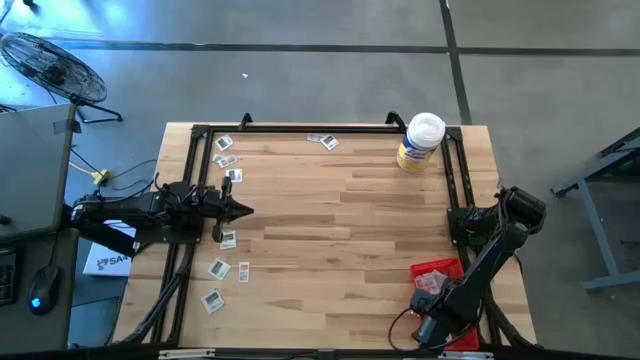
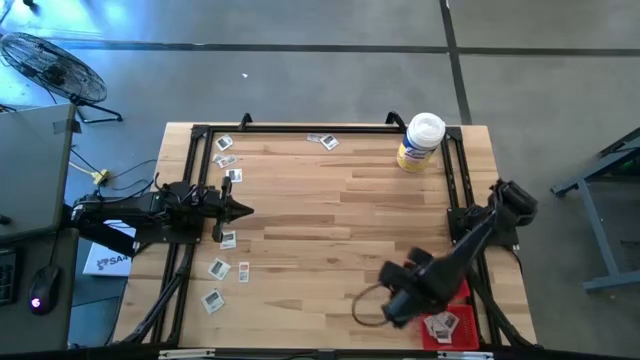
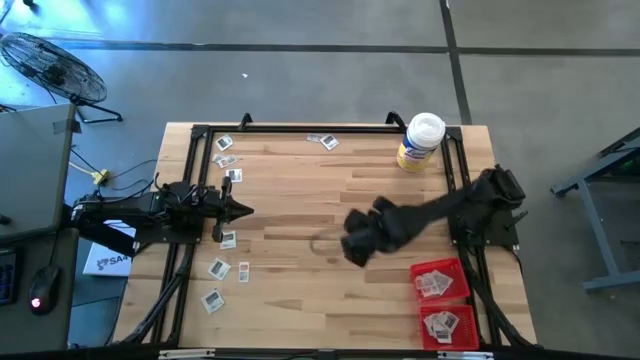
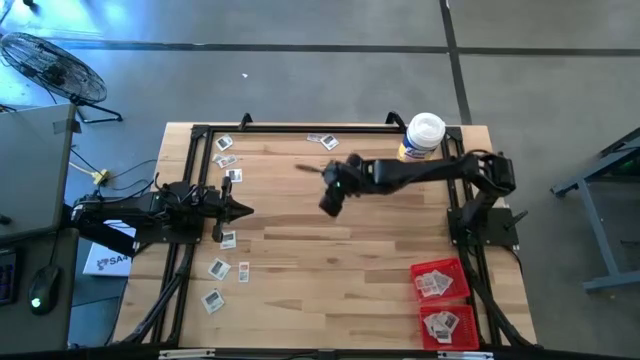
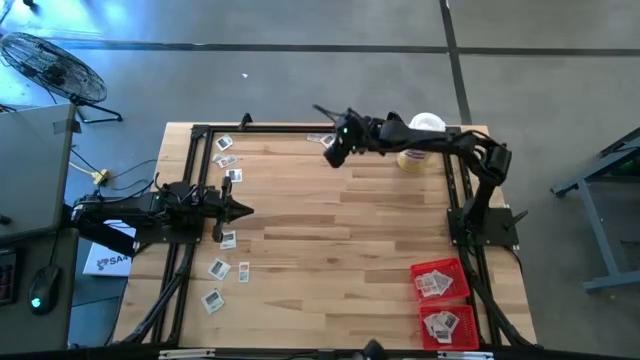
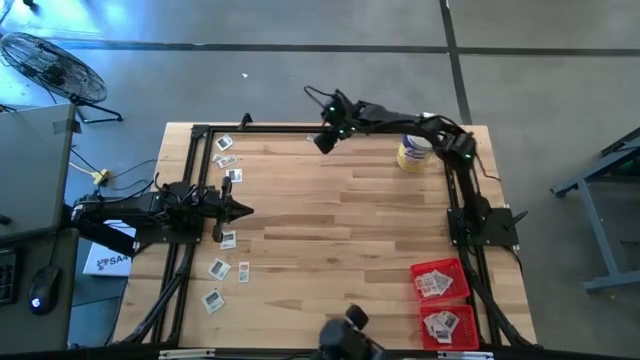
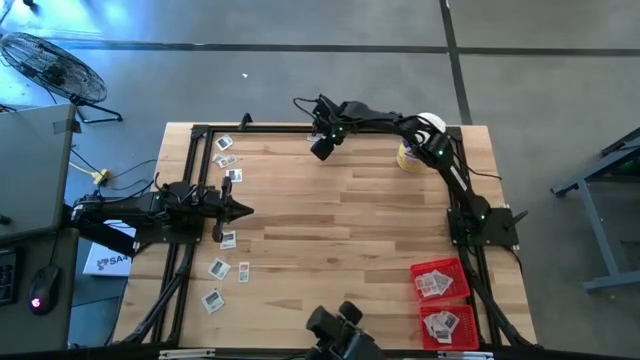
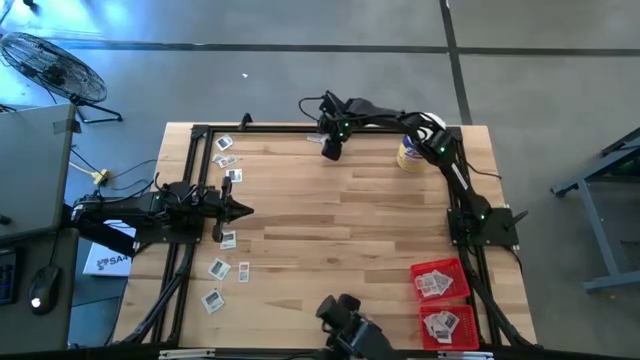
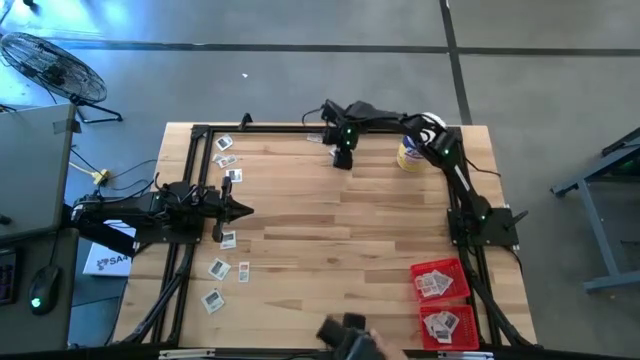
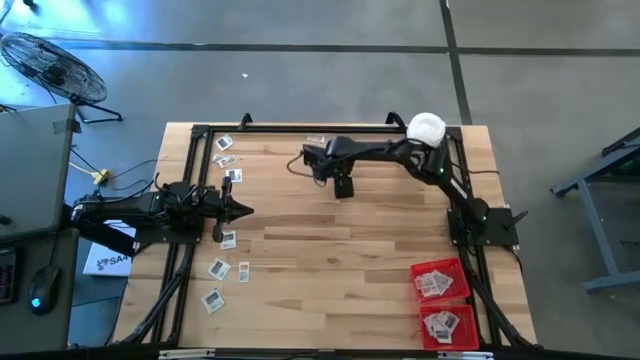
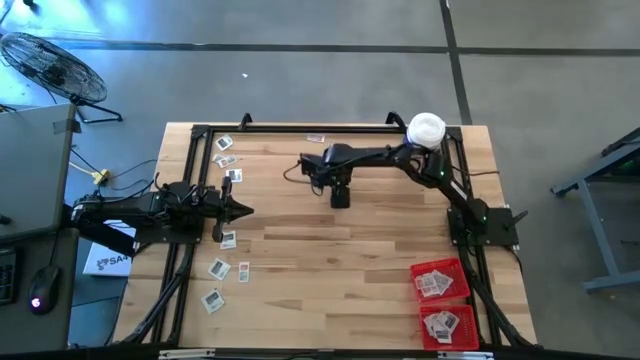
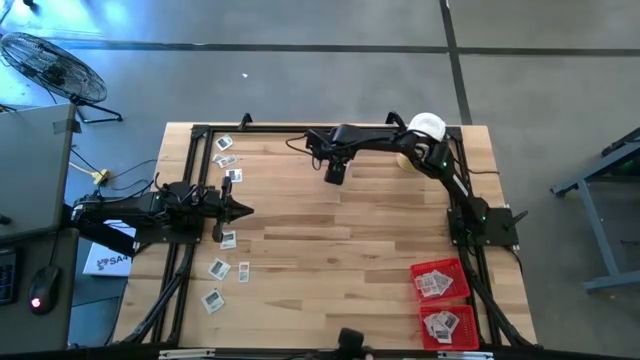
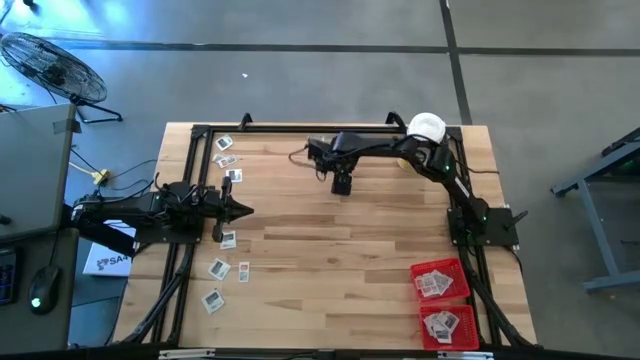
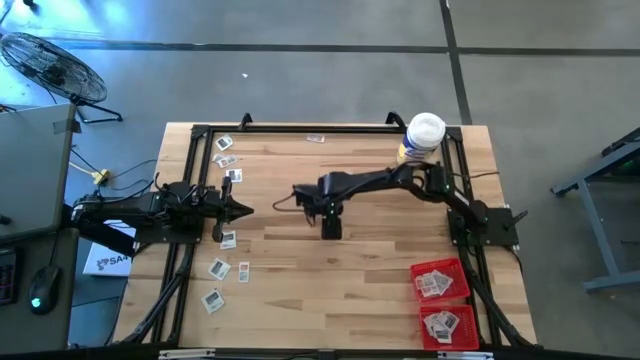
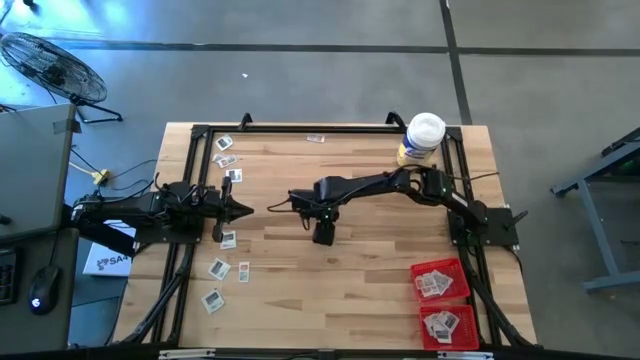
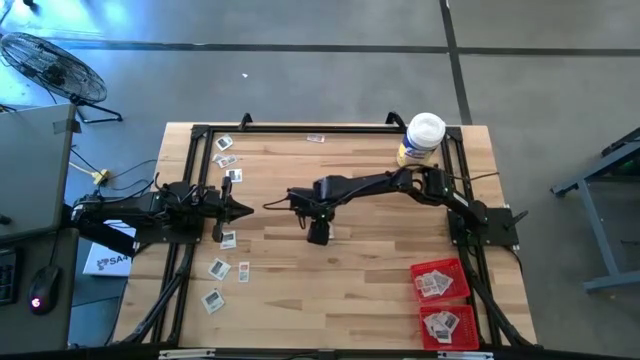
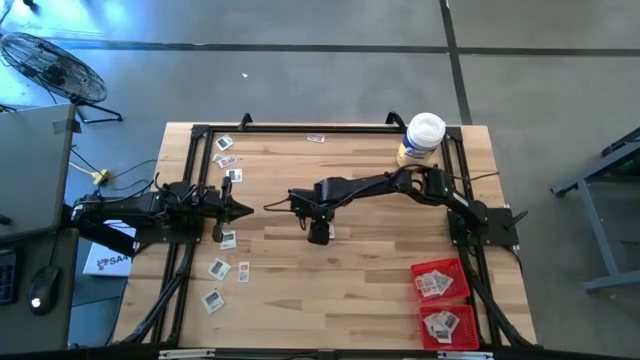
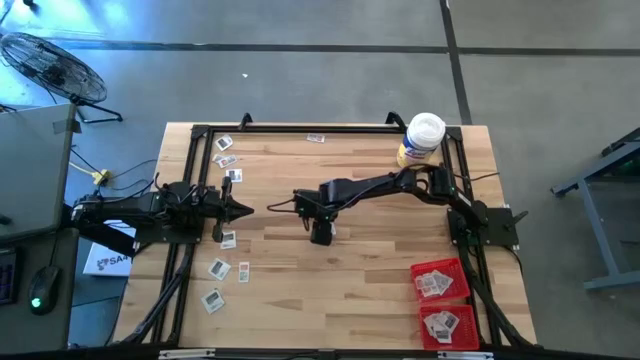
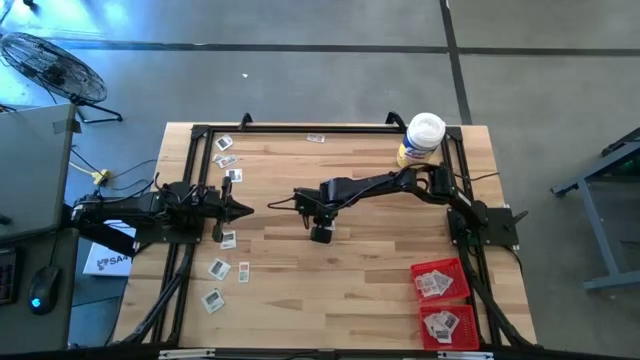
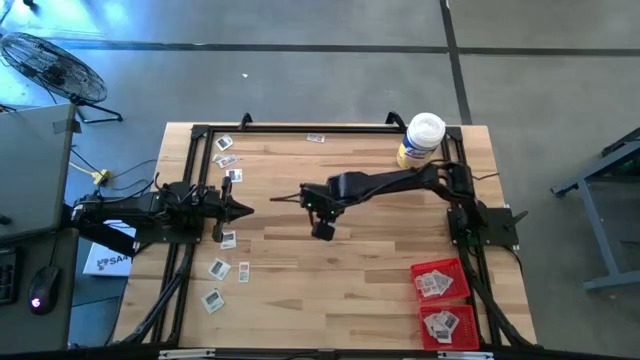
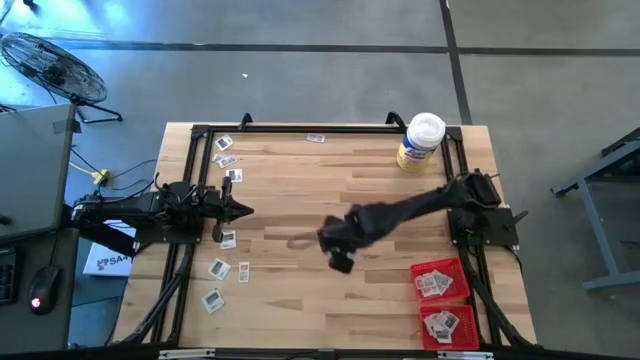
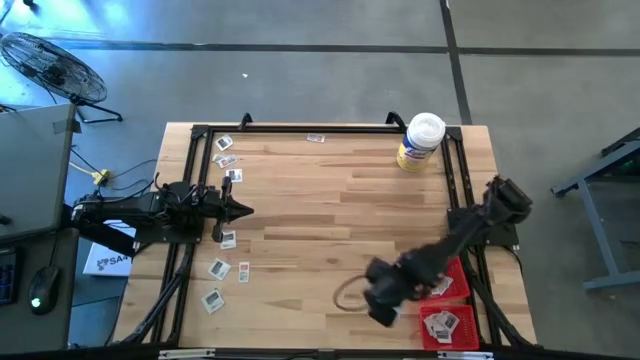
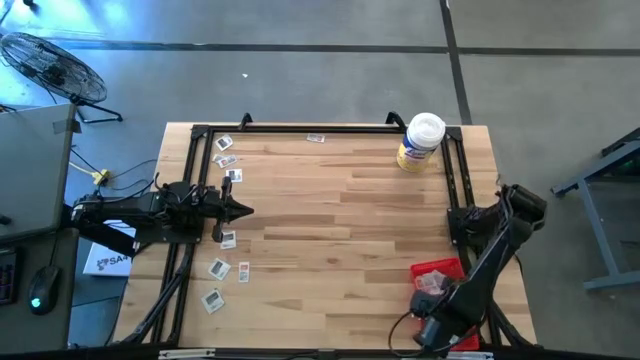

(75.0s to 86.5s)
Task: Pick & Place First Aid Supplies
Put the white towelette pack into the bottom red bin

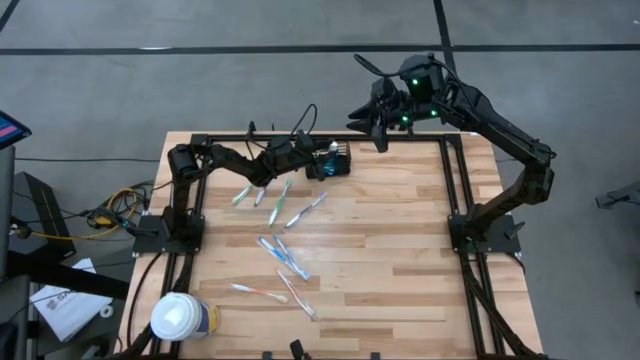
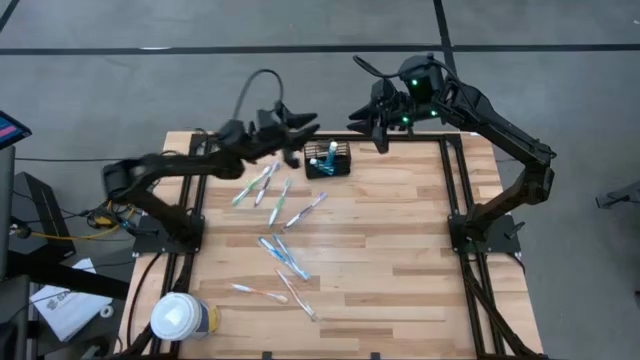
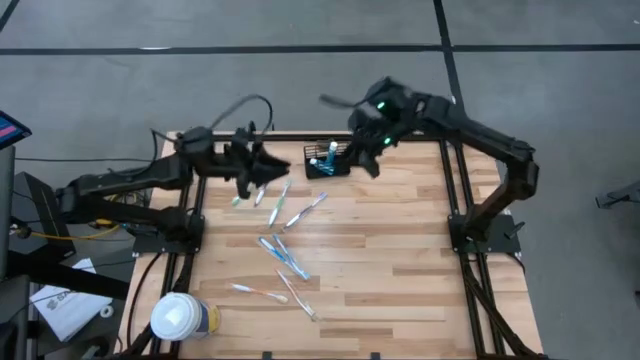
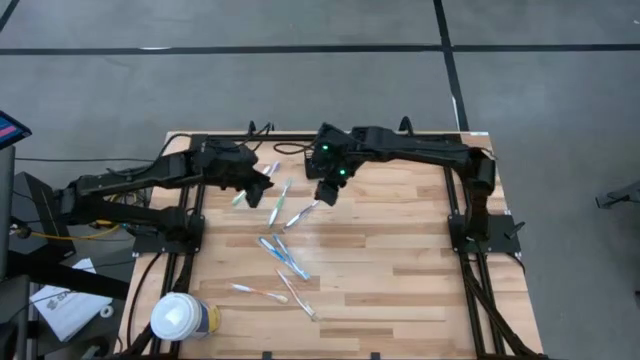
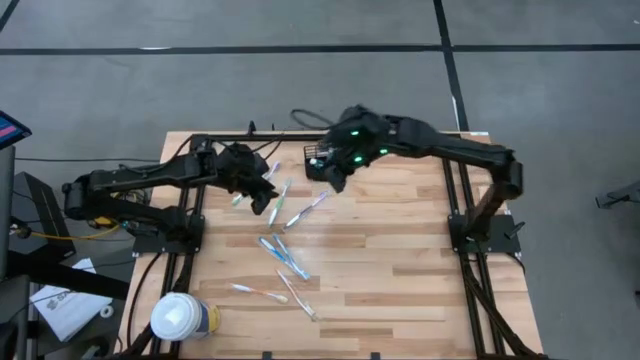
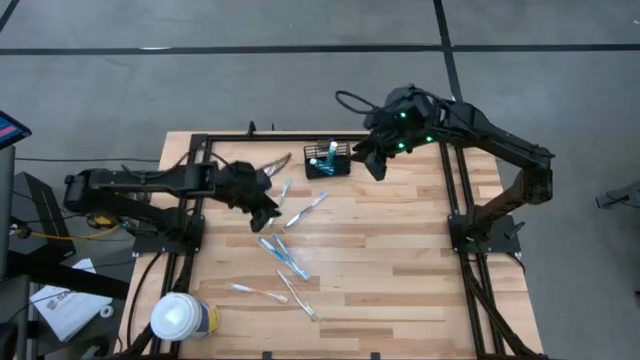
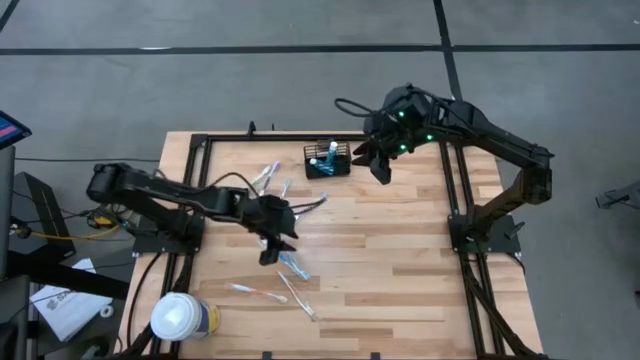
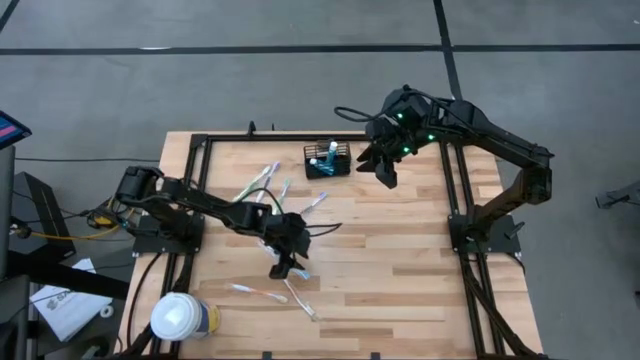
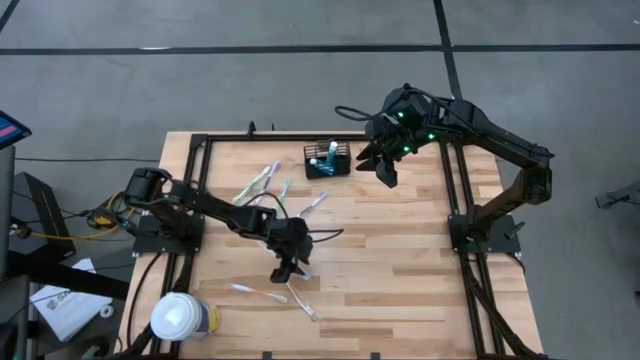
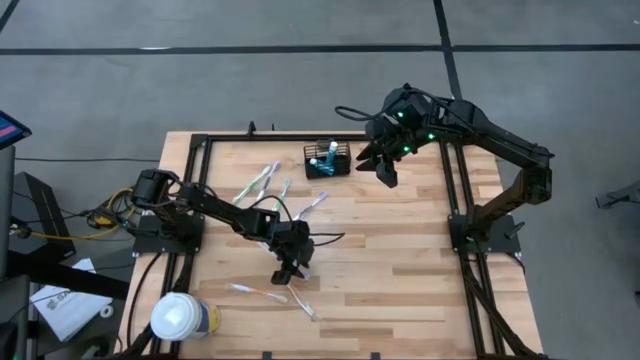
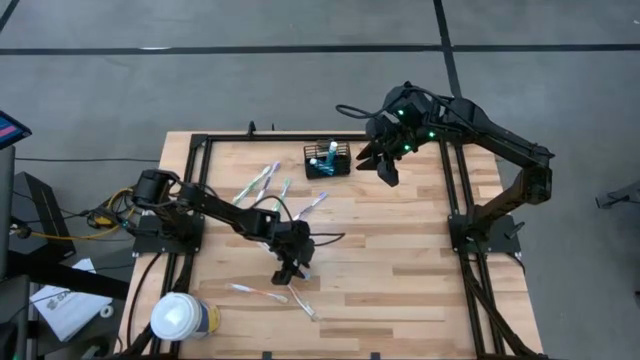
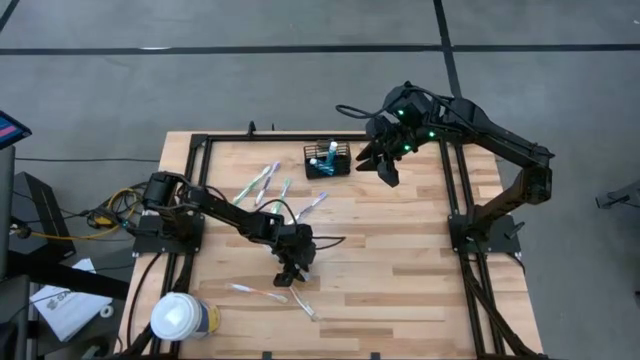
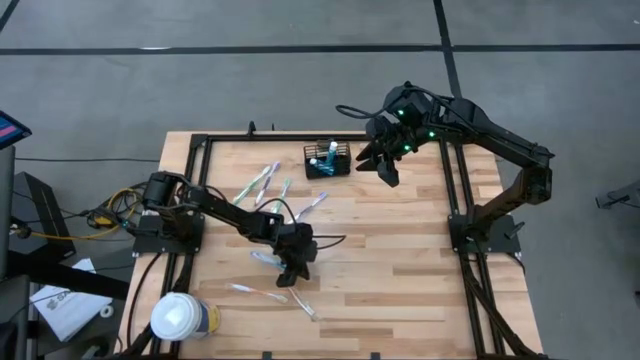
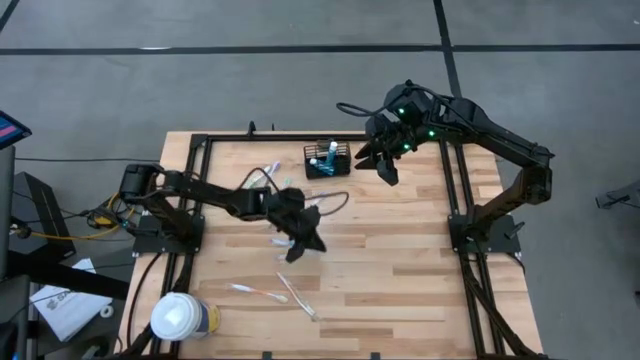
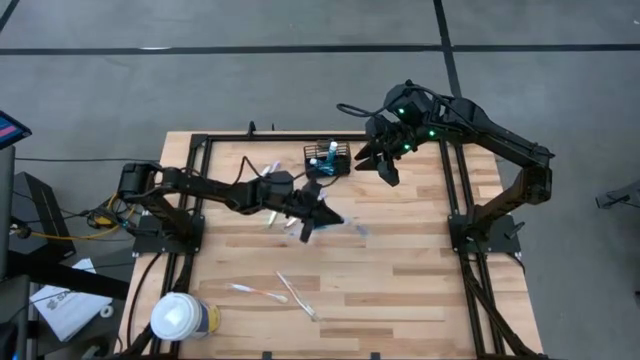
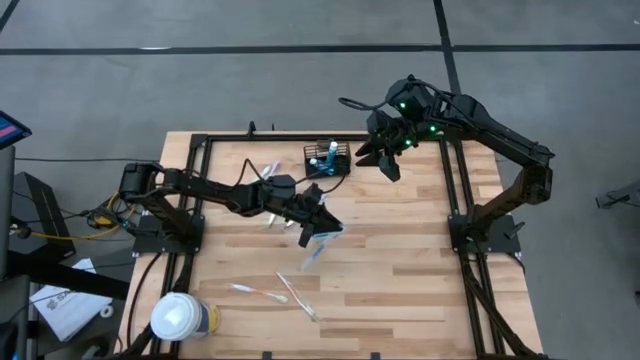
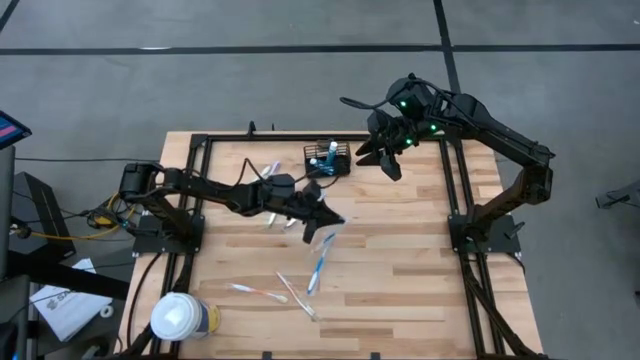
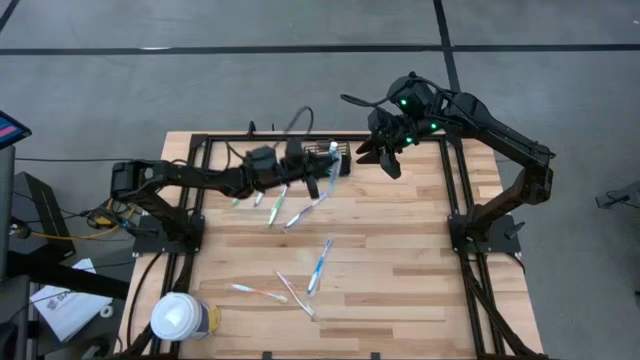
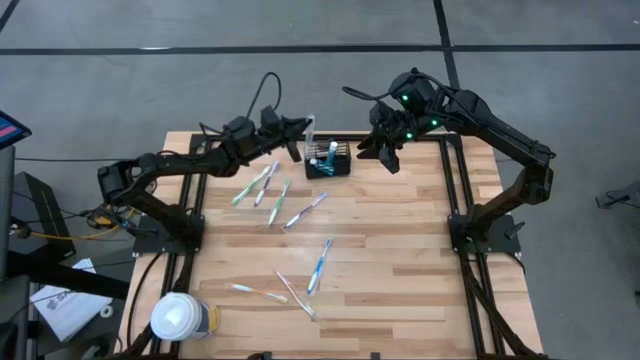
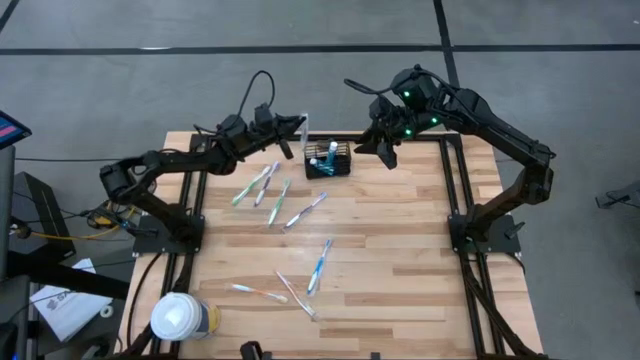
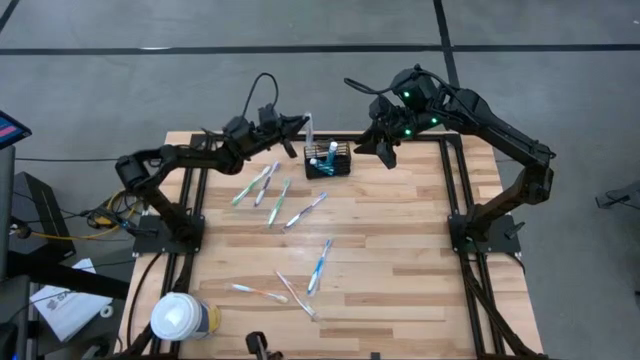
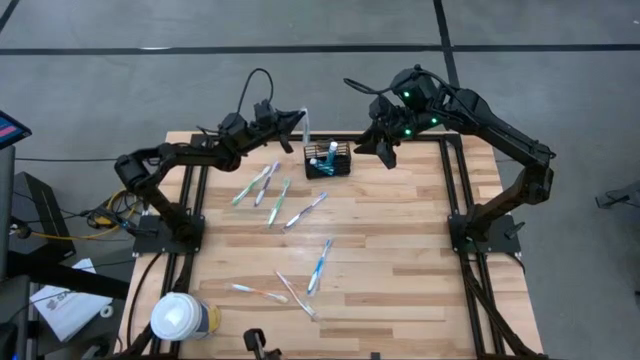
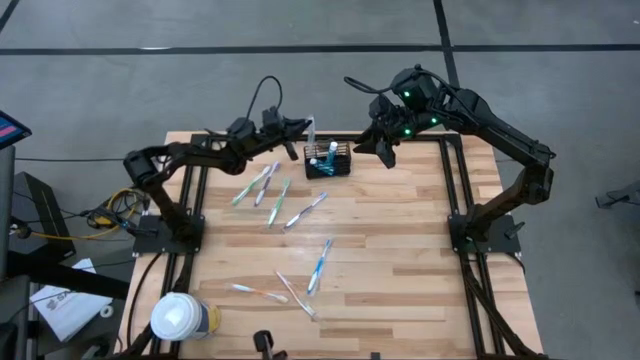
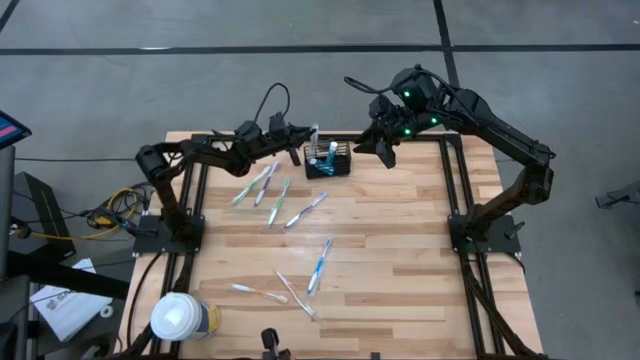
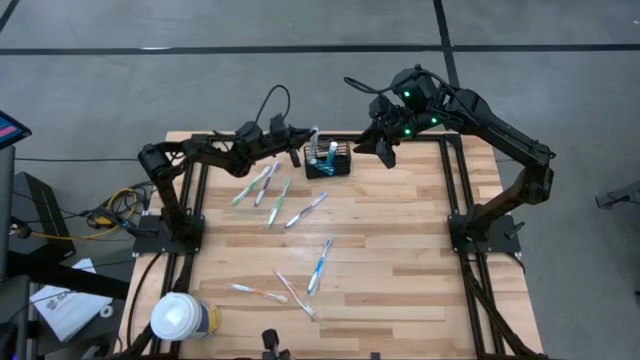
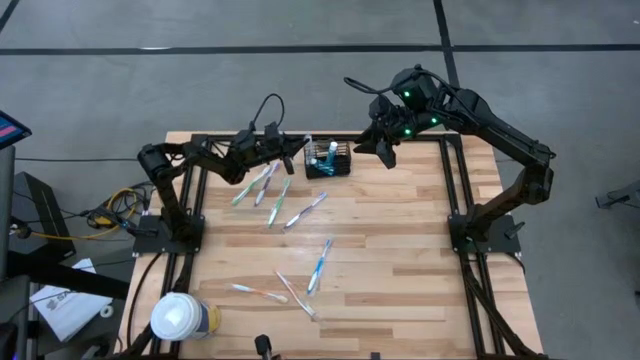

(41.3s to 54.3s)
Task: Pick & Place toothbrushing station
Put the right blue toothbrush into the black wire organizer
